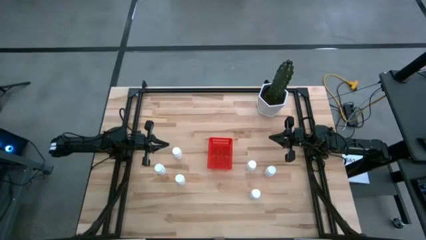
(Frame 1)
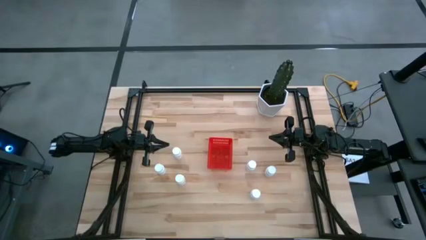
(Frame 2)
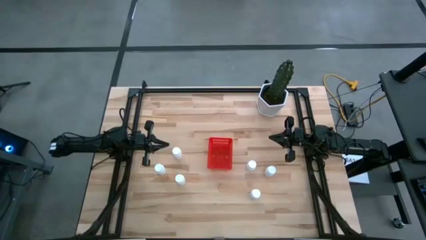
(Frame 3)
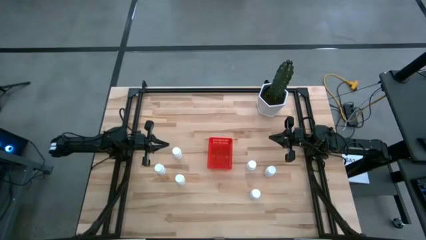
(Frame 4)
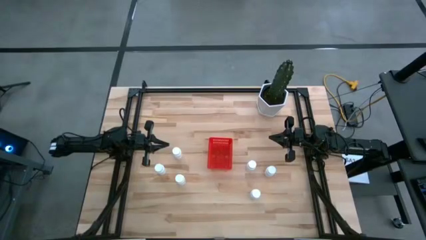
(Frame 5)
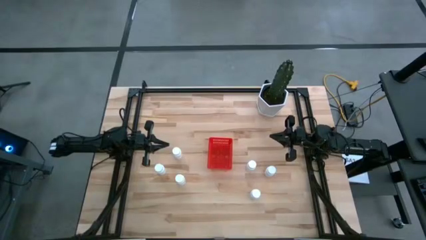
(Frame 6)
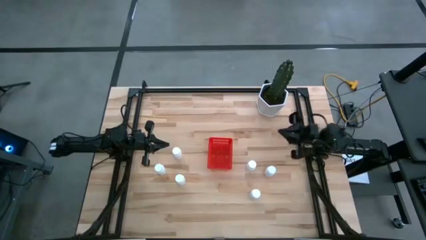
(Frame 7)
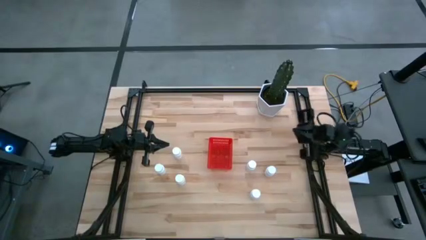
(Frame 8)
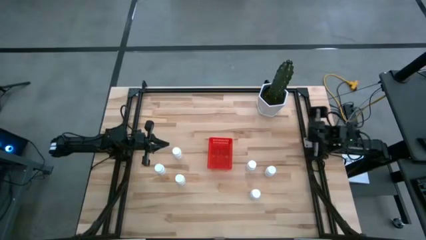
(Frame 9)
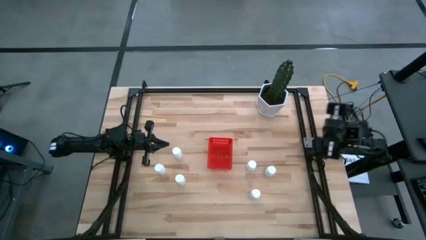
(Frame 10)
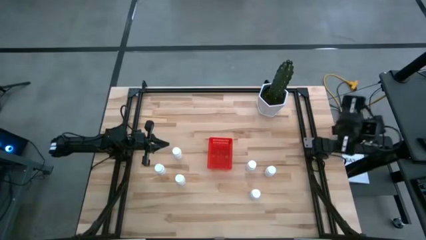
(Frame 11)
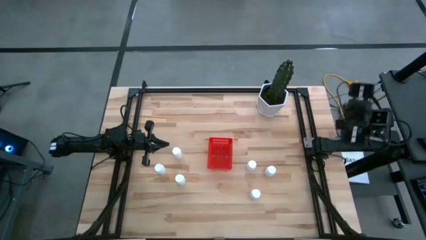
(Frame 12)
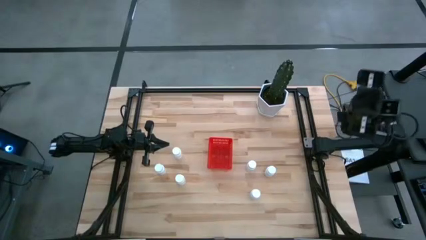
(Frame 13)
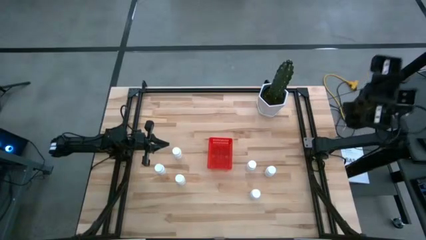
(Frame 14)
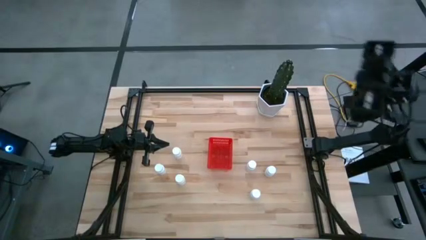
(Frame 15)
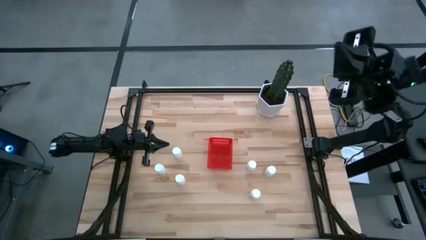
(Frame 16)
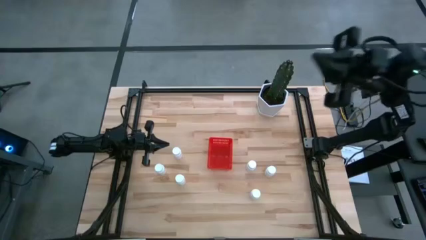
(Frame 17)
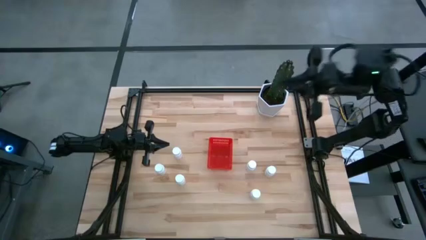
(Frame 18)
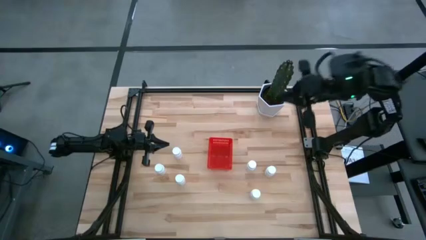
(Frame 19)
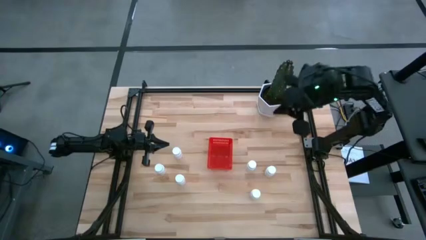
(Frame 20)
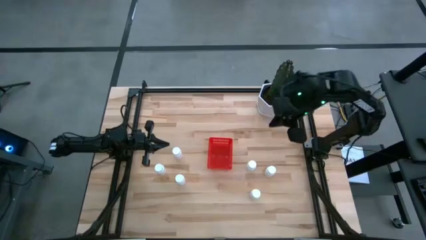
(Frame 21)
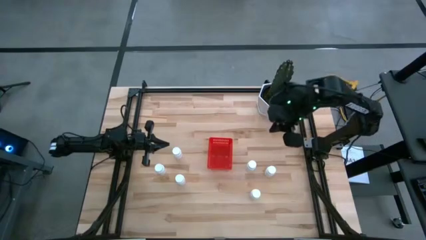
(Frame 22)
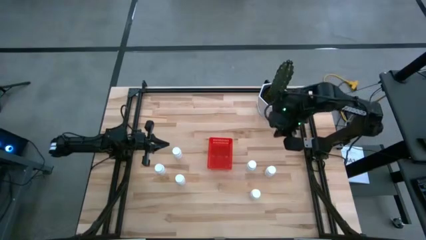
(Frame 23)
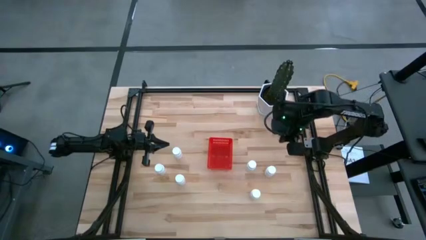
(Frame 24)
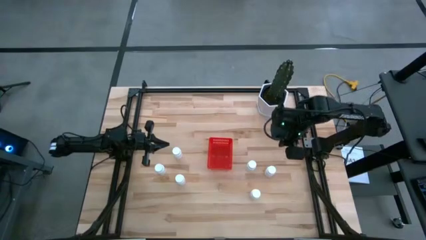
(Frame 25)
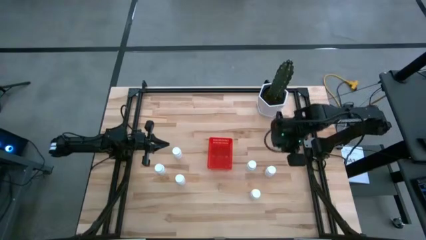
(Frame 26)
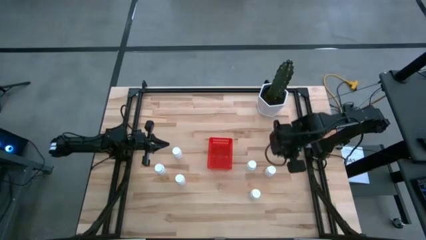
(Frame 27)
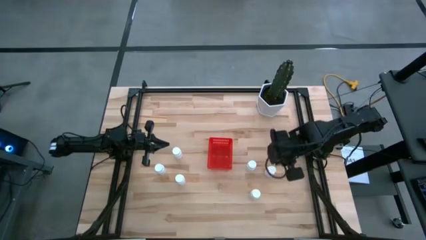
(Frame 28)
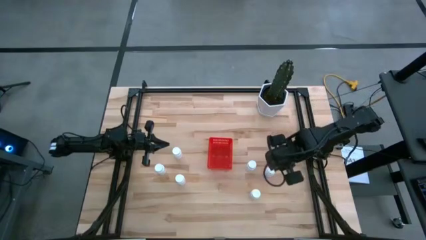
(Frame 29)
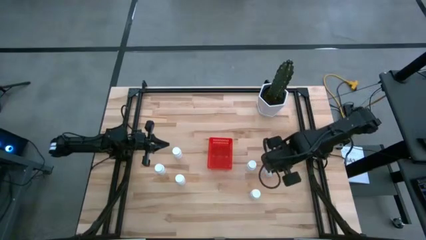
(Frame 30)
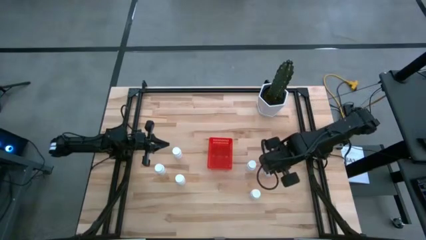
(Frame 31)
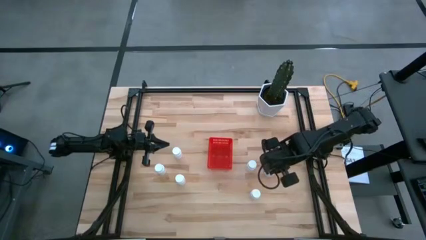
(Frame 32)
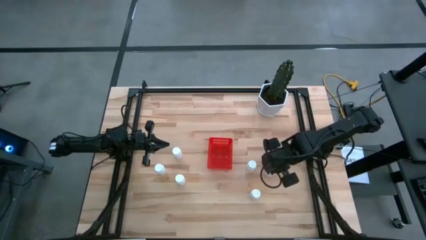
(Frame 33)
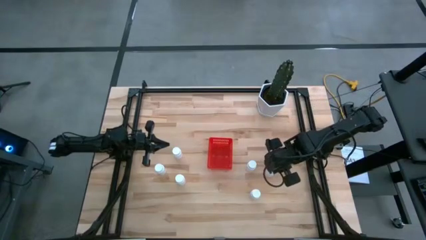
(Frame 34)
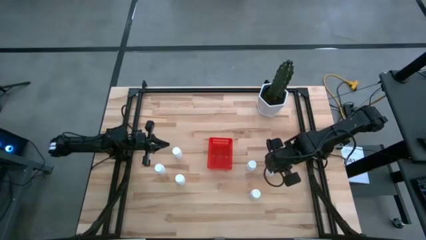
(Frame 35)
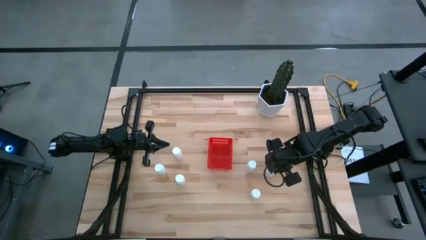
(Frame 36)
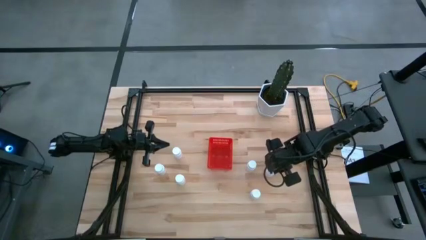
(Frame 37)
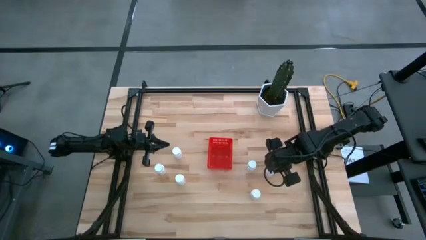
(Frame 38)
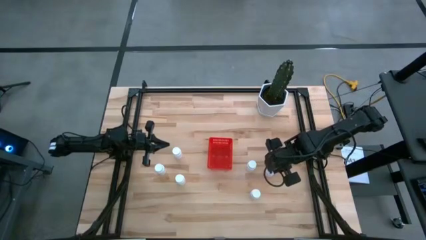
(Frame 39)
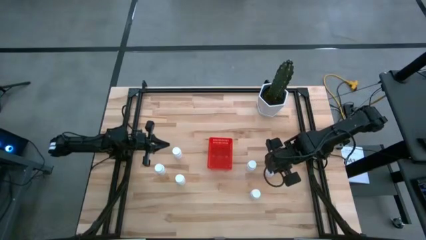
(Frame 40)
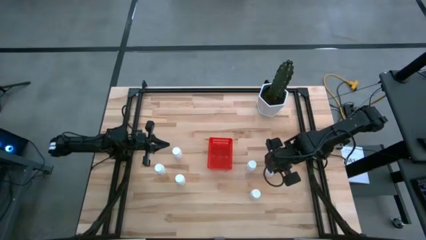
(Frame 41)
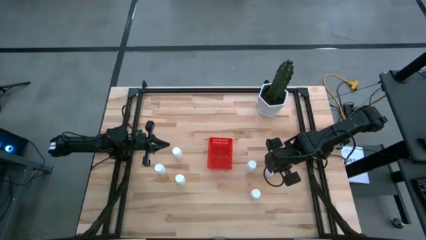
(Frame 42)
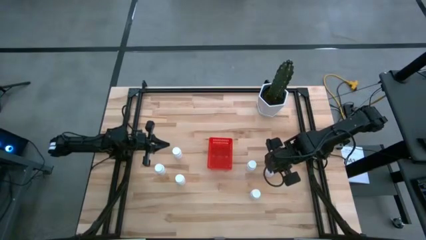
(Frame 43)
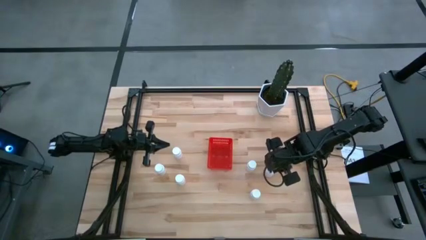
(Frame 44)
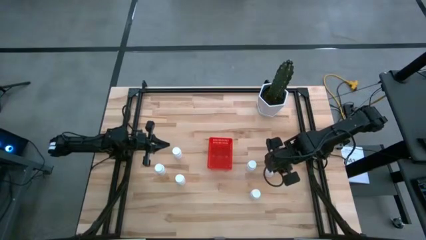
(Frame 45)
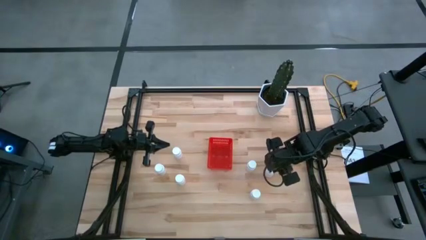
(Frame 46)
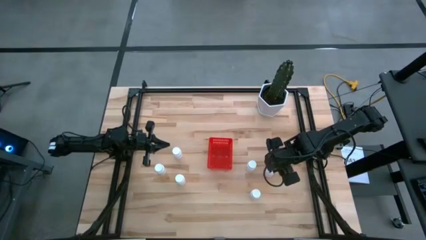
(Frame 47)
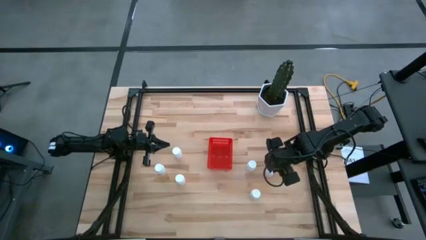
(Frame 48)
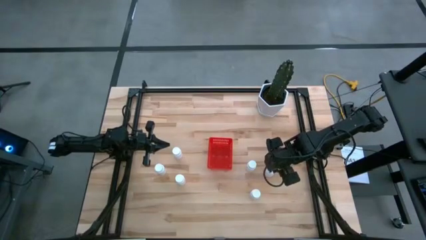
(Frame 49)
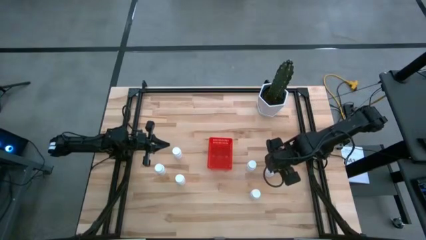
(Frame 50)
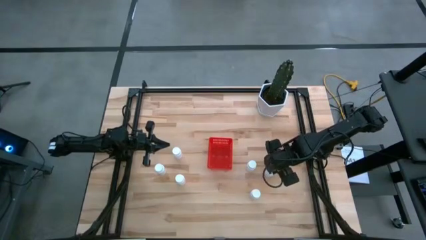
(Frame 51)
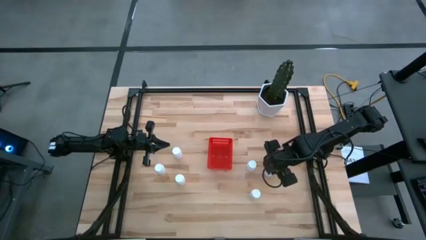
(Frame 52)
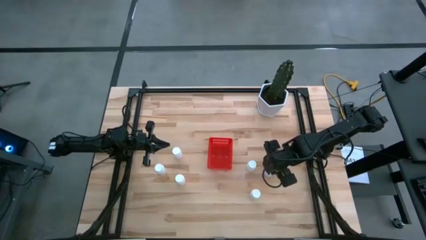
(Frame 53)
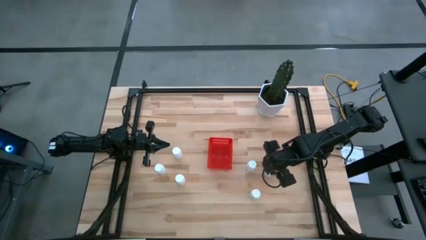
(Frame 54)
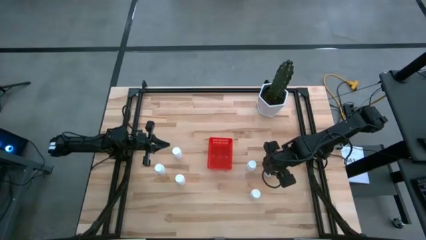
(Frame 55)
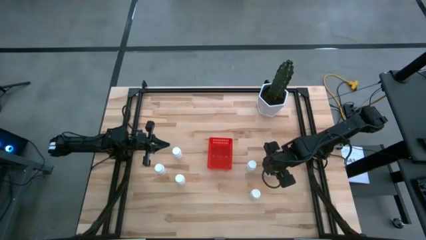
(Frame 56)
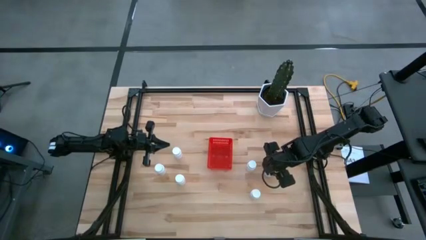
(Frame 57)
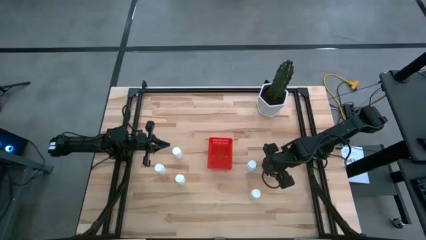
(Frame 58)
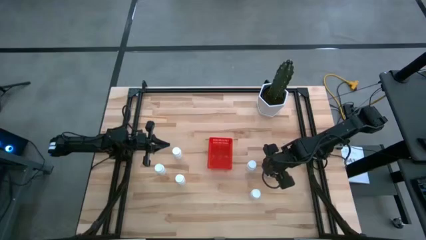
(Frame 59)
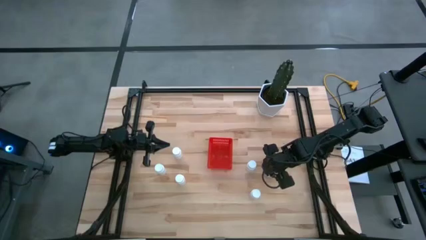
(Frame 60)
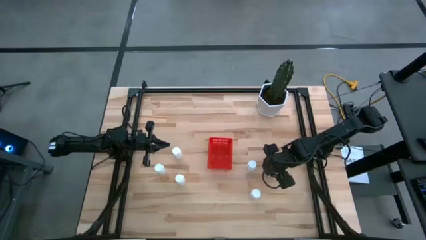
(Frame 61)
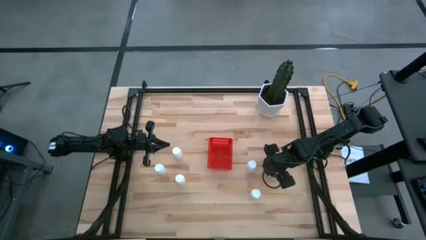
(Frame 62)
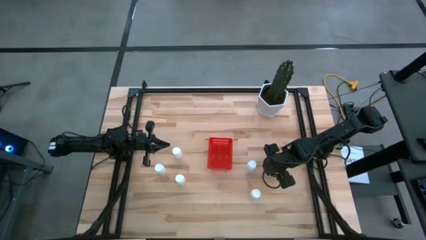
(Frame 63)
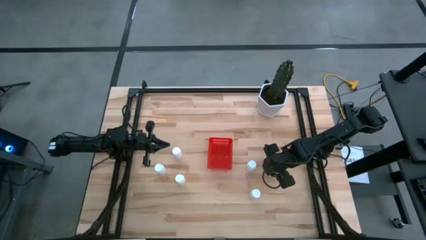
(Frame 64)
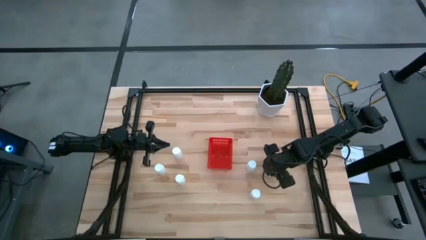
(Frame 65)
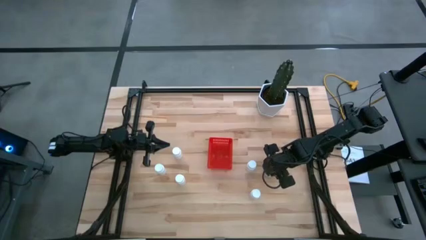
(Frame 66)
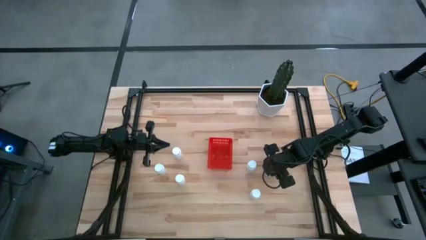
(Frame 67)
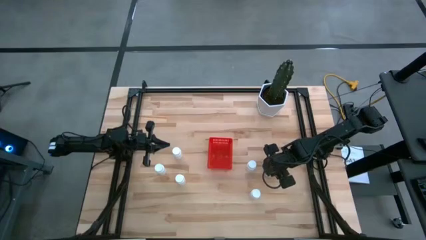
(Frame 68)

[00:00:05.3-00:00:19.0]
Task: Pick and place pill bottles into a basket
Put the white pill bottle into the red bin
